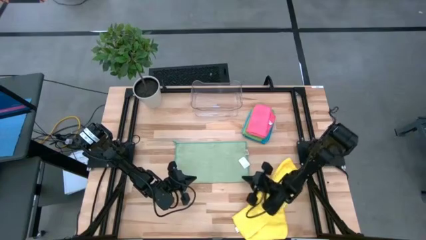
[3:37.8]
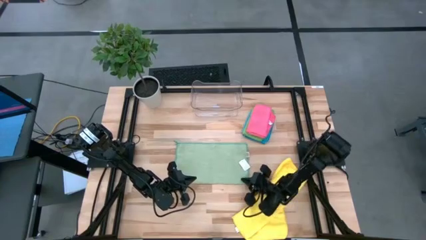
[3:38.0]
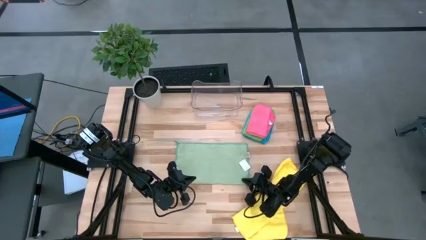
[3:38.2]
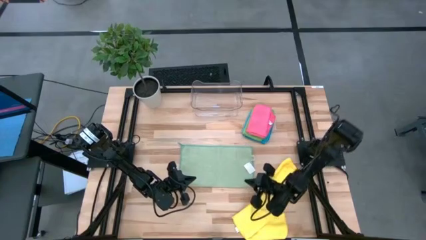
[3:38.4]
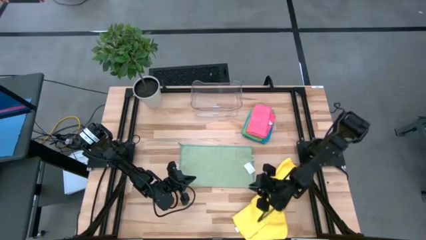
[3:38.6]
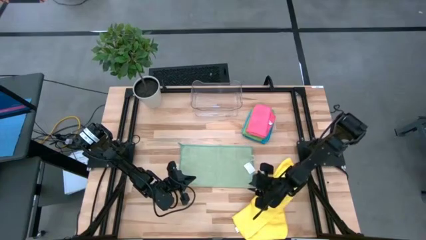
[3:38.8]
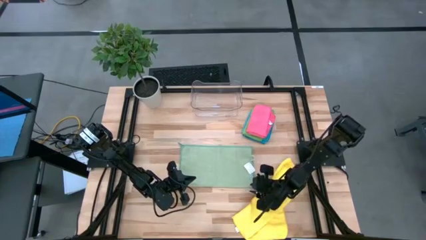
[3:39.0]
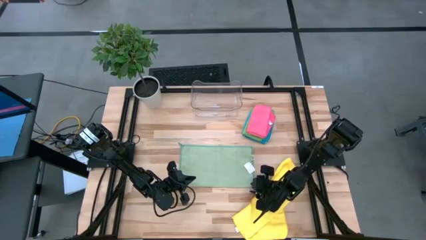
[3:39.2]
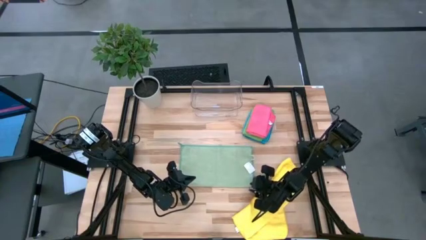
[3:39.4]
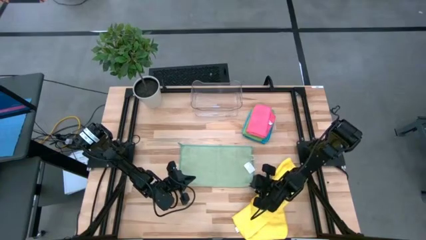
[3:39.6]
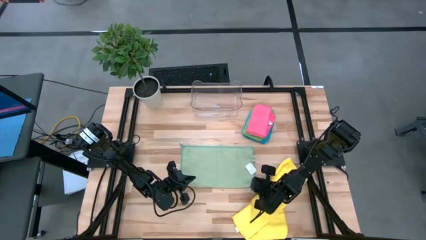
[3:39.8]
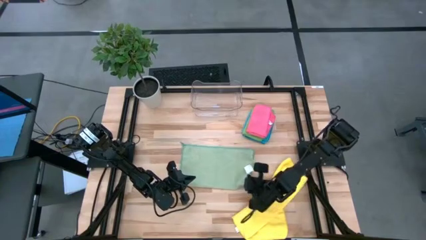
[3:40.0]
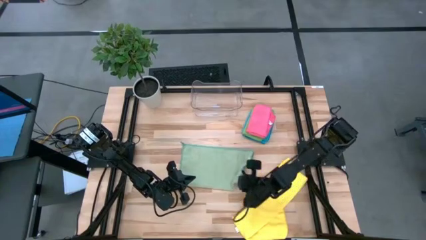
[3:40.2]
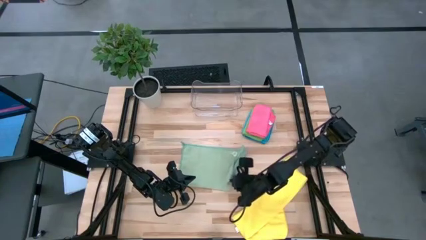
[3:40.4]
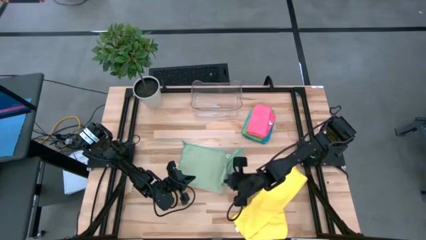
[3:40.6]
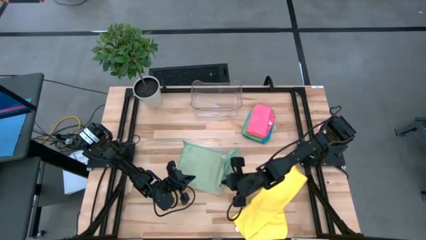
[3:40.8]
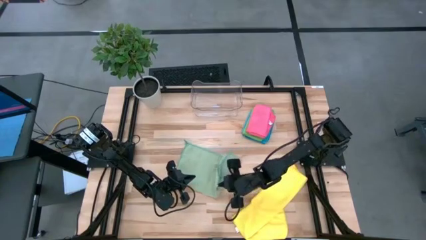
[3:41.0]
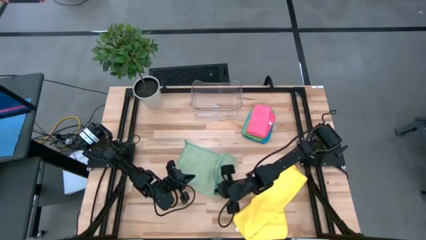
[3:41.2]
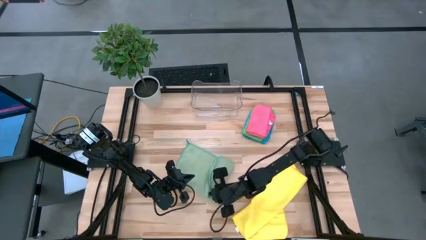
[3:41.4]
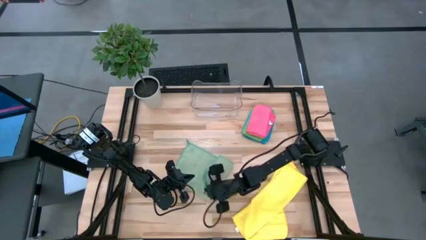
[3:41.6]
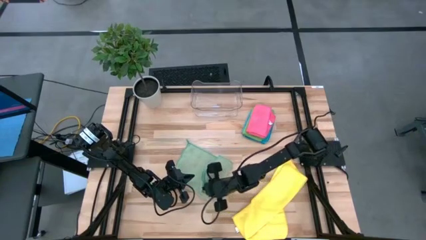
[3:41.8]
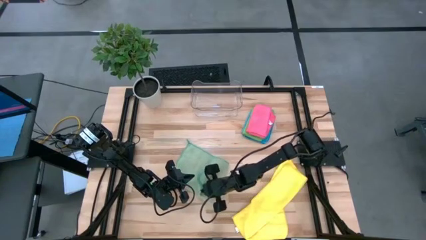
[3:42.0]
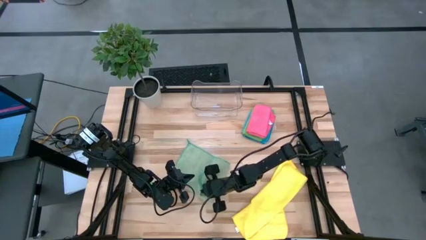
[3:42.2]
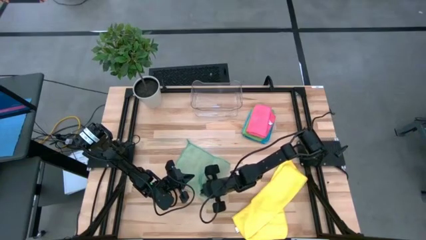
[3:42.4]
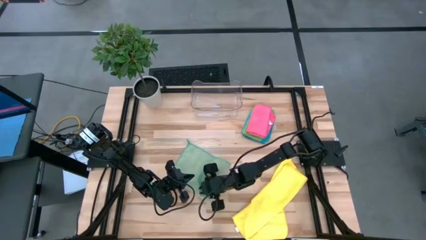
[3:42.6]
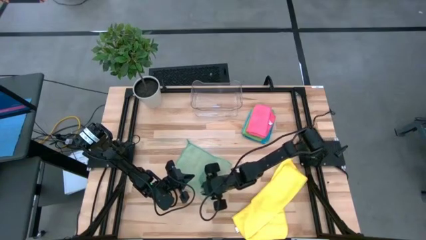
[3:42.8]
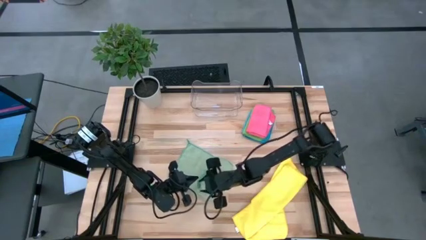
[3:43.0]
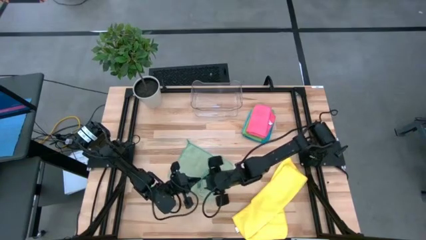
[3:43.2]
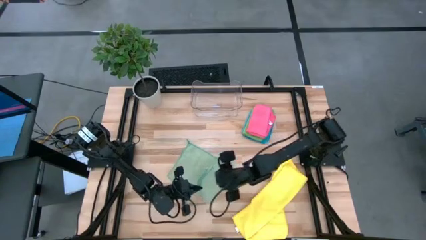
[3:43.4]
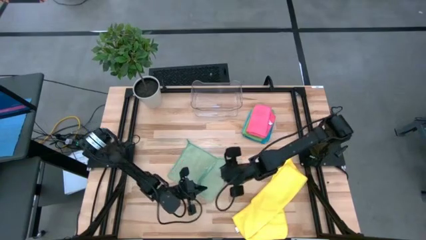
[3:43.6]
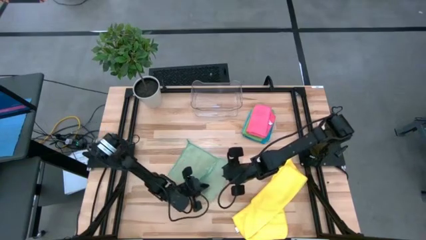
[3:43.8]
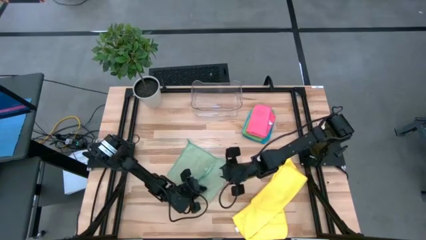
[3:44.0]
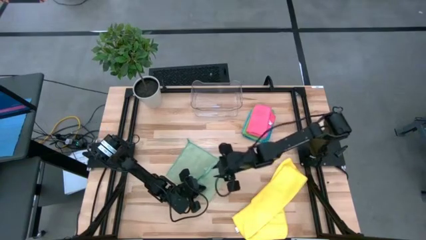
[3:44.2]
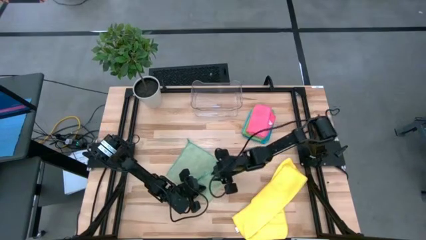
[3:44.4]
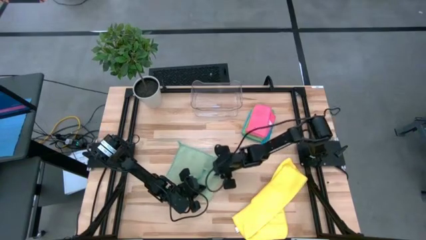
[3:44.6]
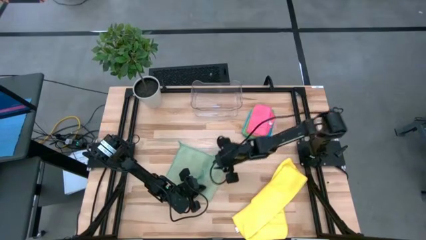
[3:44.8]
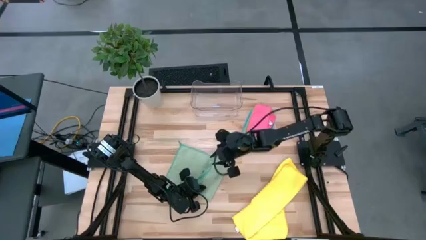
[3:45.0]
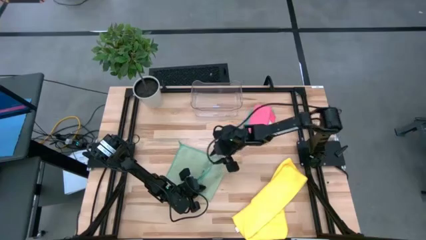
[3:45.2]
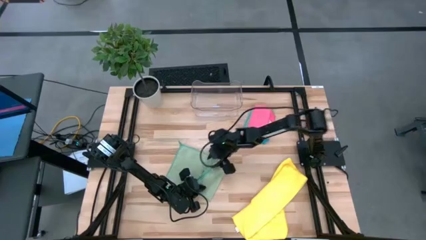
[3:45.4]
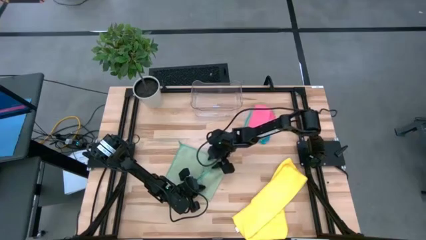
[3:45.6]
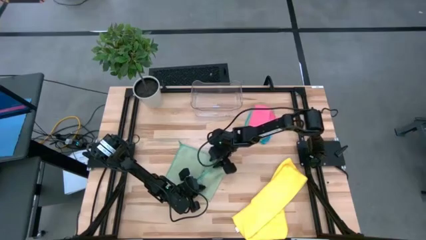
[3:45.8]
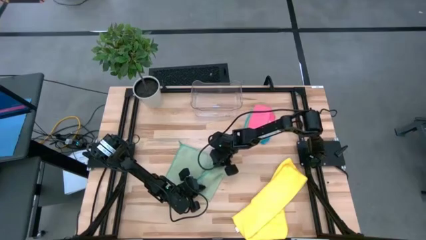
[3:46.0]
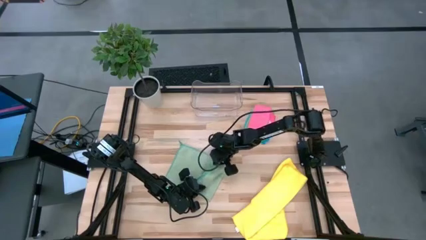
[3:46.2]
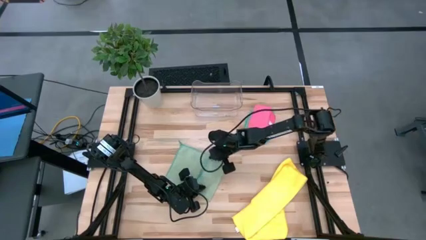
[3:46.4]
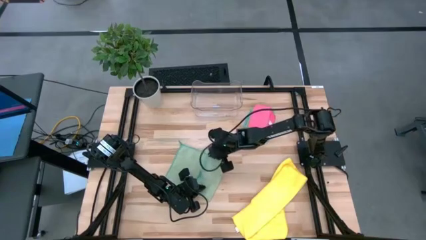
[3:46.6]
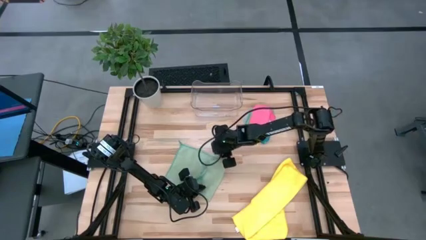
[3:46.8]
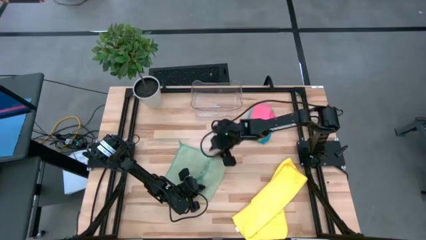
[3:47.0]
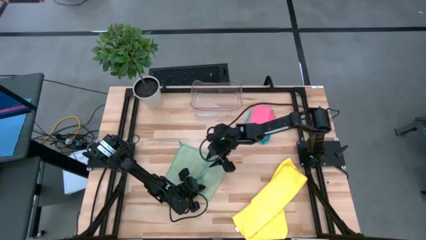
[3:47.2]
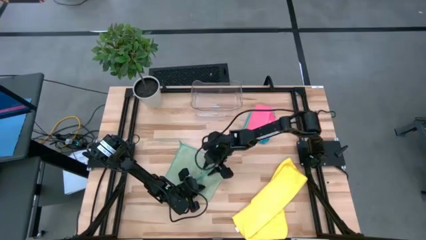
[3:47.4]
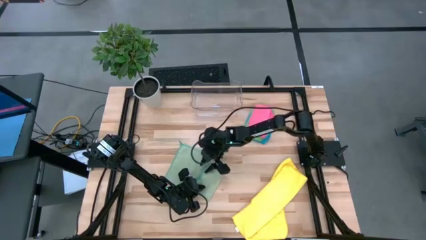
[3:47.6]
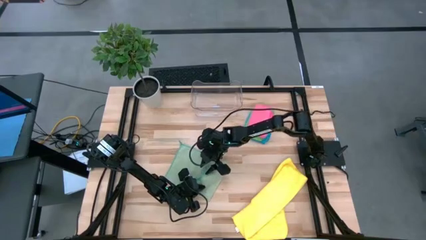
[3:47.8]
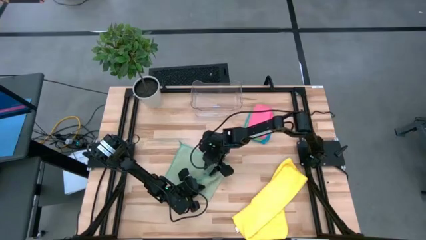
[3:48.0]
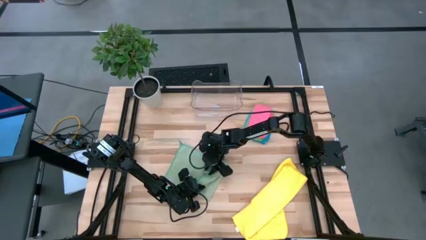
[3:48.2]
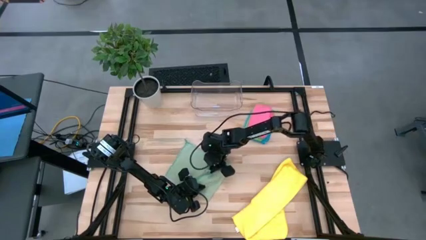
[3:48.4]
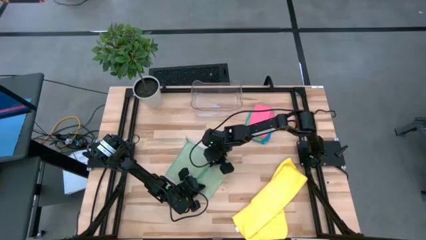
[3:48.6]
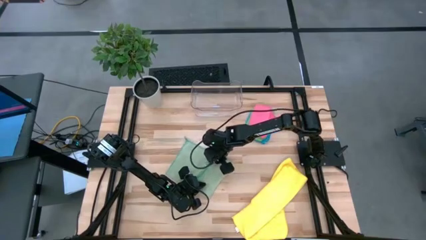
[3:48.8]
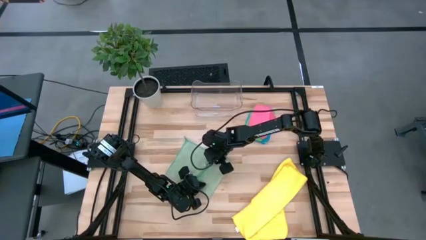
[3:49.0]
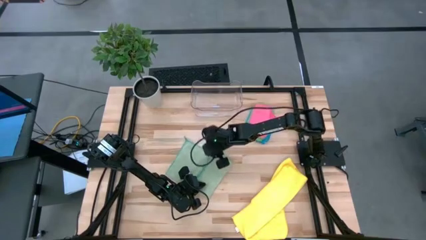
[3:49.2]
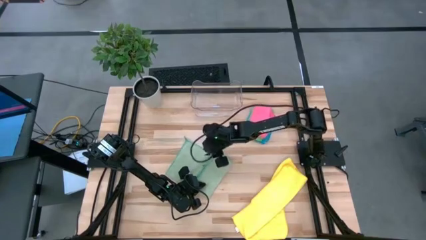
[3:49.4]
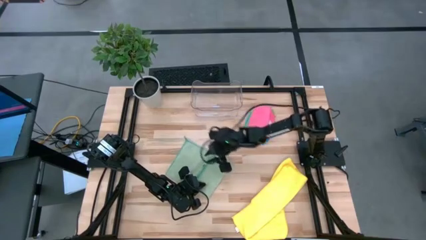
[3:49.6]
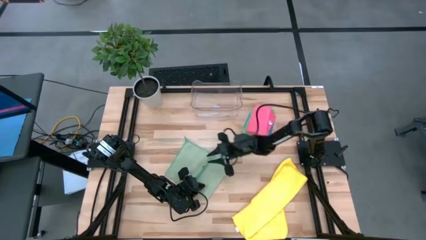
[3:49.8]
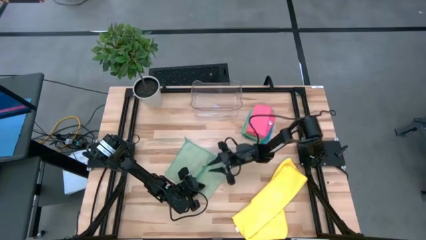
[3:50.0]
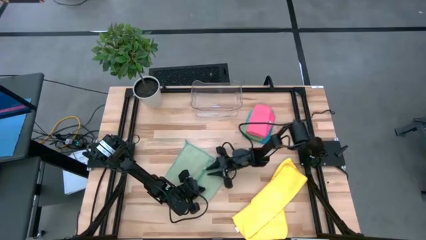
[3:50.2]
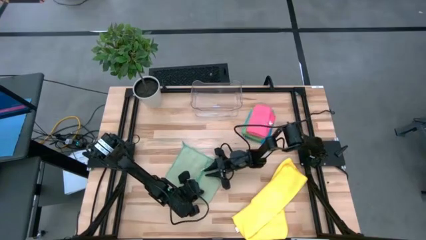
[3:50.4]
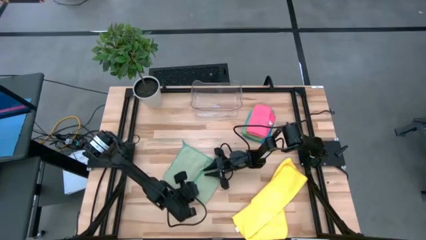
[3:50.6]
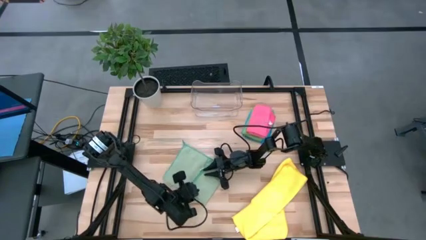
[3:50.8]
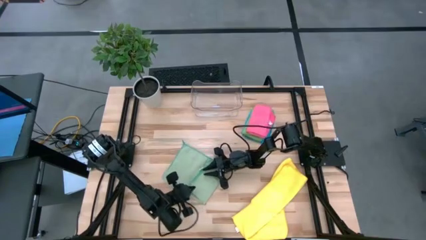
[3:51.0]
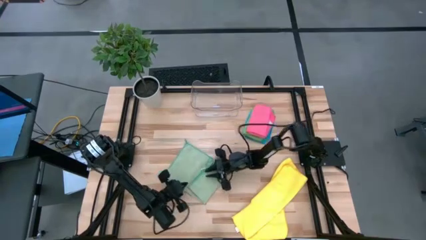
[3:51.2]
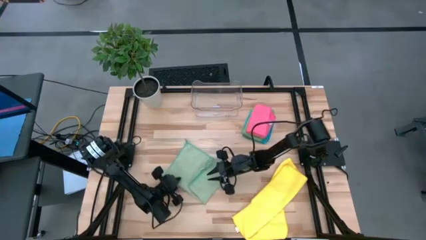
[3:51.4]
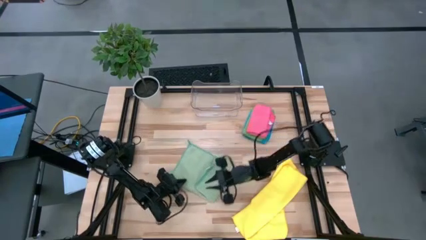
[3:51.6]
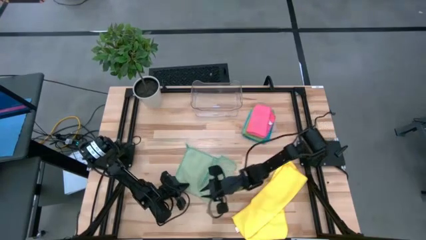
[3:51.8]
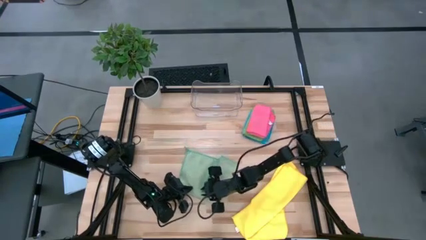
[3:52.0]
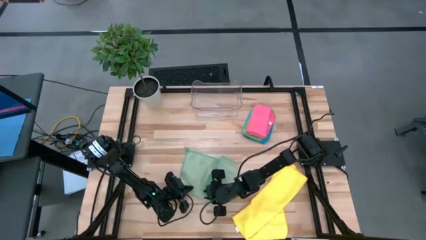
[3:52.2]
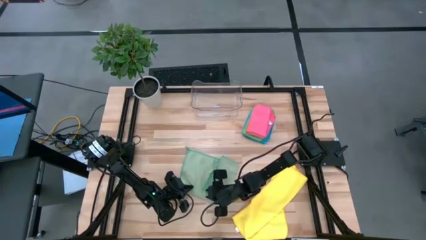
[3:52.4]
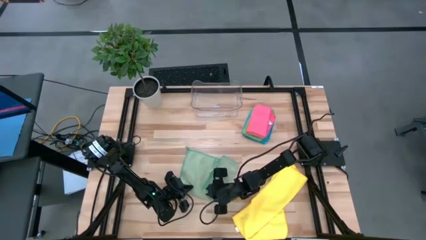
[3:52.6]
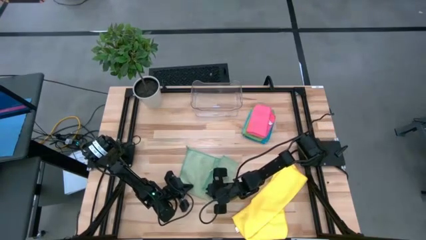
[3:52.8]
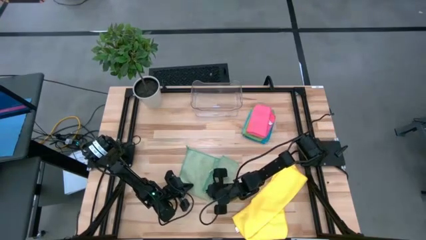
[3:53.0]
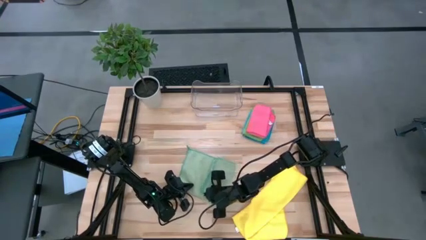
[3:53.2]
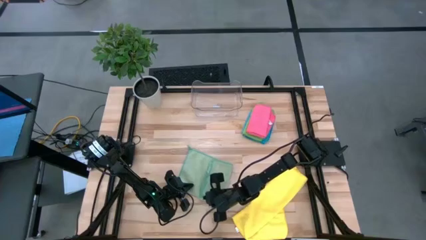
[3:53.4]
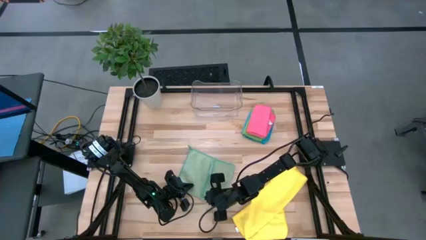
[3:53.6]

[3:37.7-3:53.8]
Task: Fold microfiber towels
Fold the light green microfiber towel
